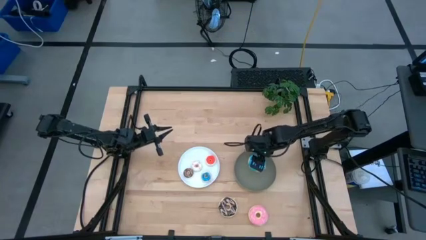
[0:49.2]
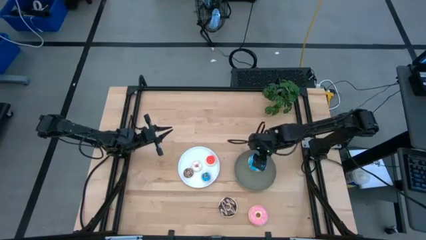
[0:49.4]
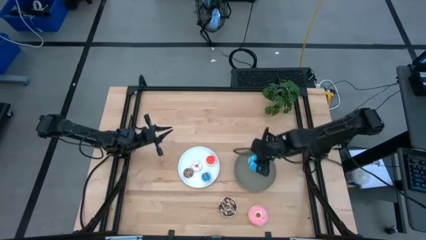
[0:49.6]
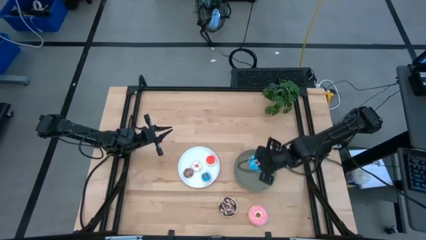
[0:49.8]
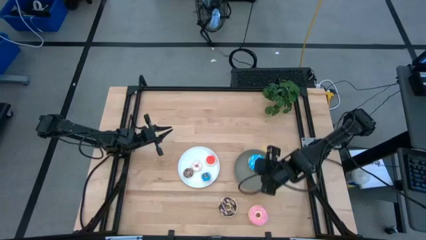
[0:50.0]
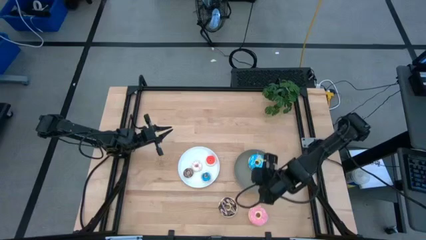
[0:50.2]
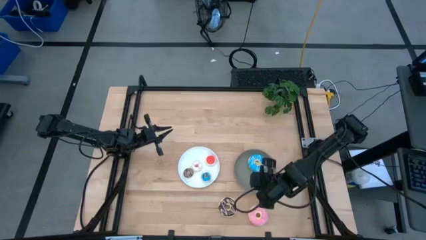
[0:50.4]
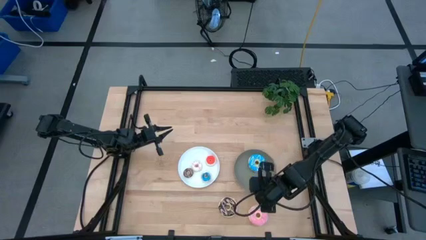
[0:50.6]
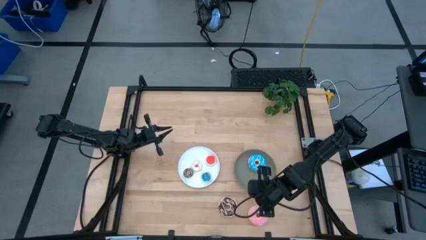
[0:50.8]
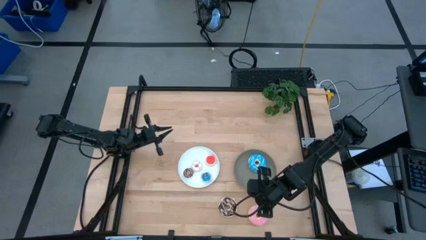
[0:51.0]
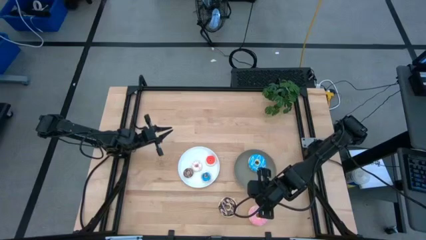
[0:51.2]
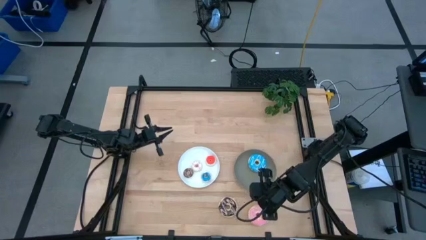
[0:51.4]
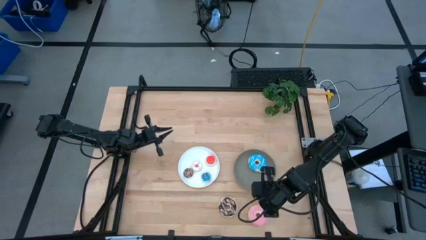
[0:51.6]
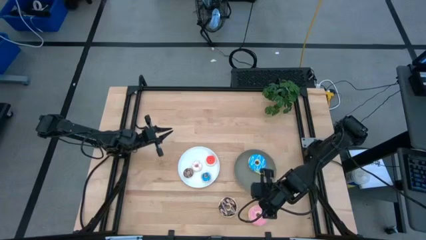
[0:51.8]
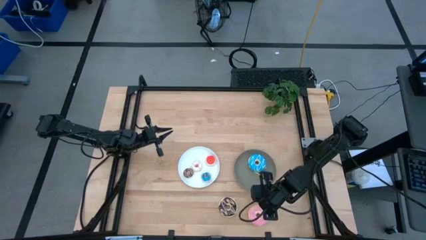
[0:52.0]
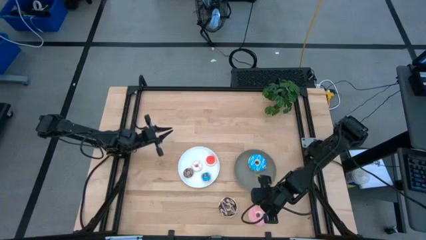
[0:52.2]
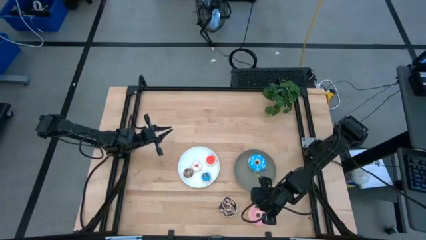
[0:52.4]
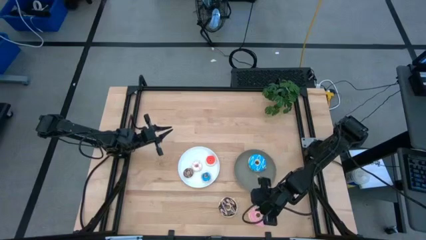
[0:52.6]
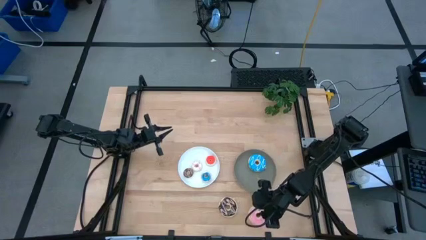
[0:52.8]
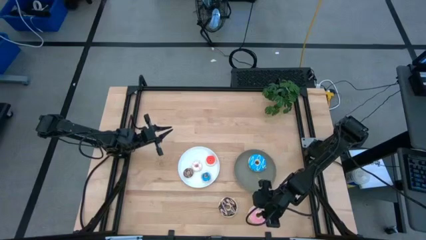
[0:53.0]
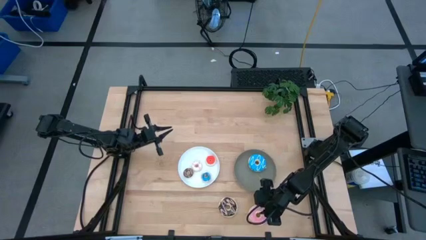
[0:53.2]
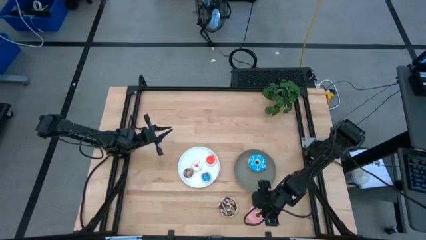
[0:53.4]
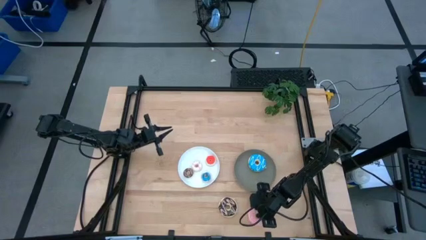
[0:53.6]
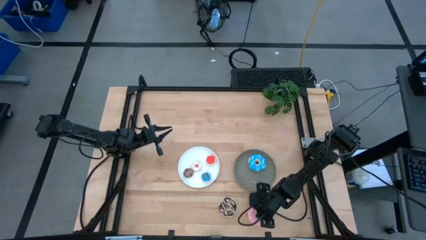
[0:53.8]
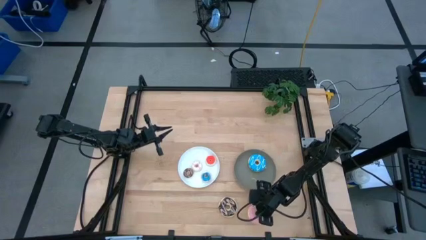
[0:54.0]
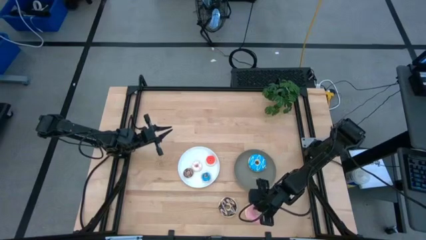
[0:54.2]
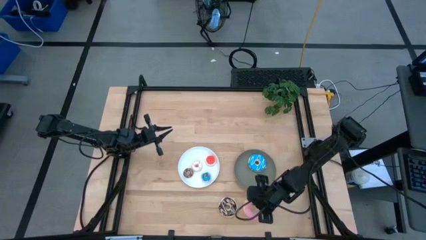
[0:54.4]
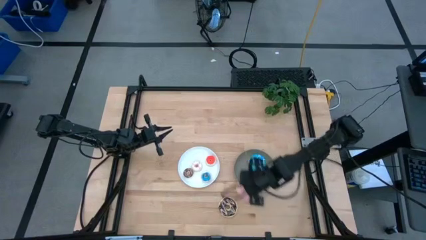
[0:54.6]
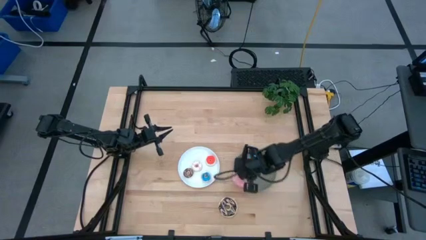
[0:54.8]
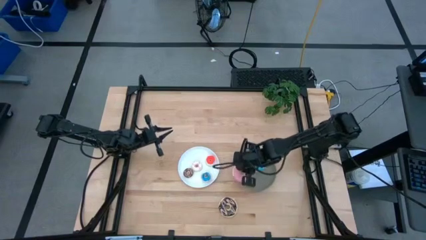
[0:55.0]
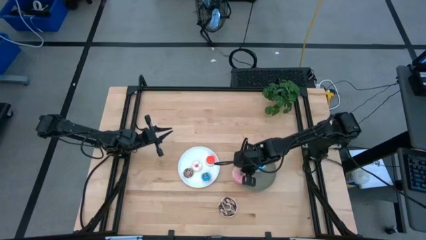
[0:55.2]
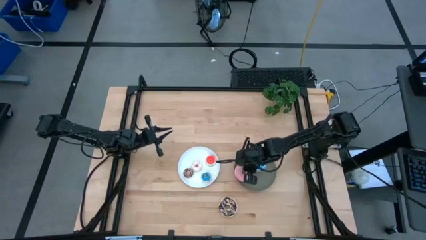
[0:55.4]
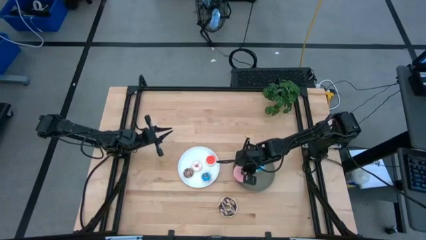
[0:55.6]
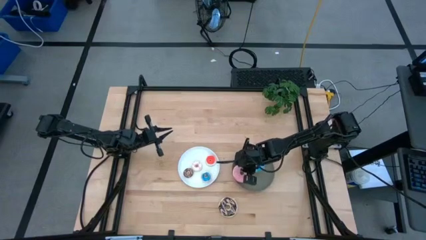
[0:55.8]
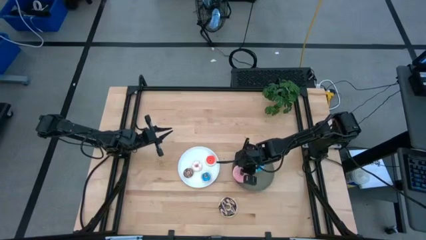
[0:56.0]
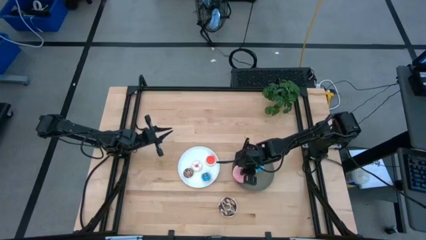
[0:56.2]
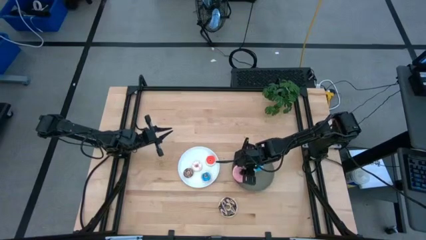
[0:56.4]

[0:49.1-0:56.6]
Task: Pick & Place donuts
Put the large pink donut on the gray plate

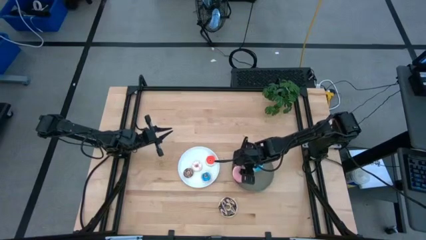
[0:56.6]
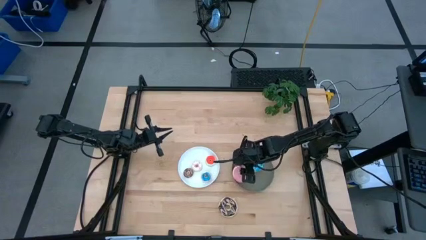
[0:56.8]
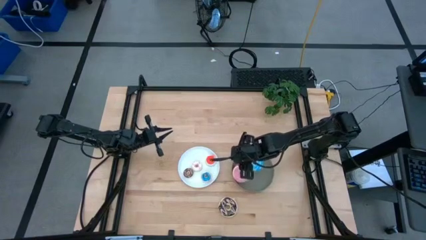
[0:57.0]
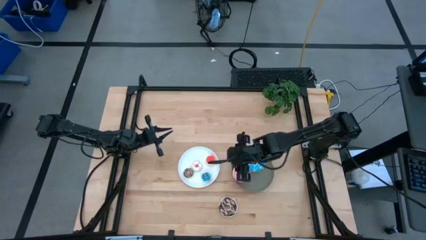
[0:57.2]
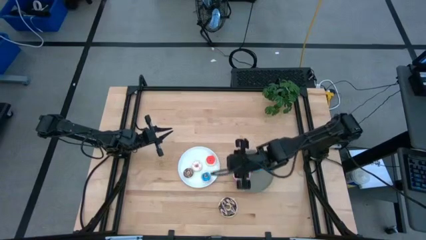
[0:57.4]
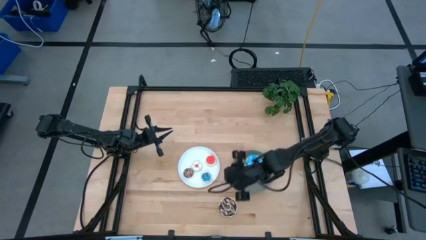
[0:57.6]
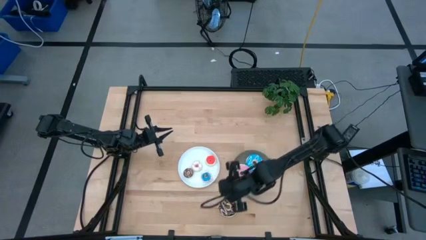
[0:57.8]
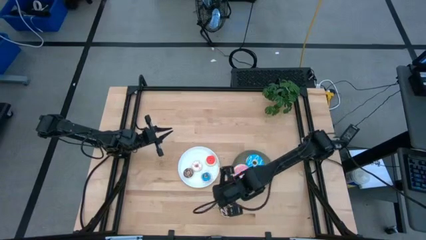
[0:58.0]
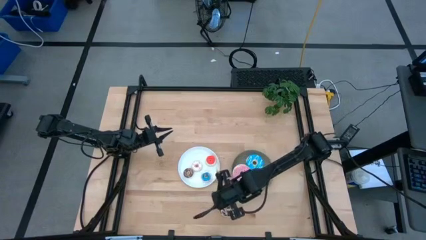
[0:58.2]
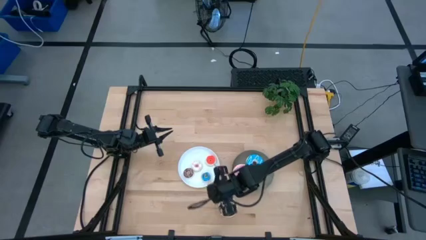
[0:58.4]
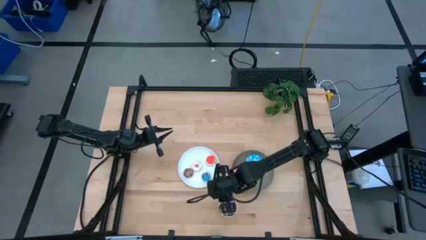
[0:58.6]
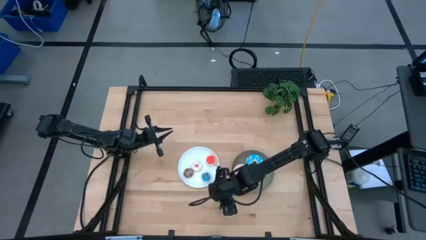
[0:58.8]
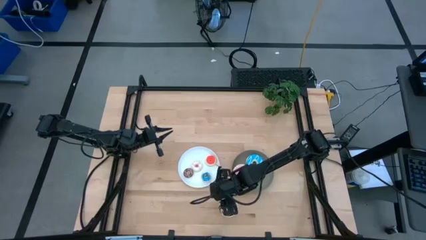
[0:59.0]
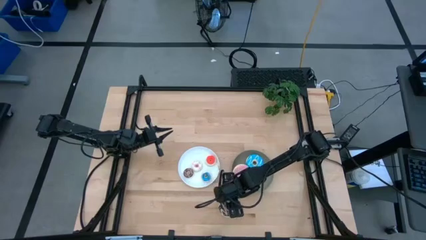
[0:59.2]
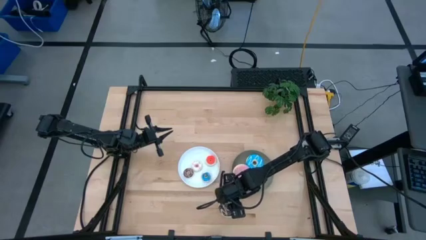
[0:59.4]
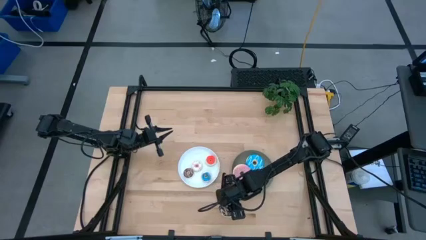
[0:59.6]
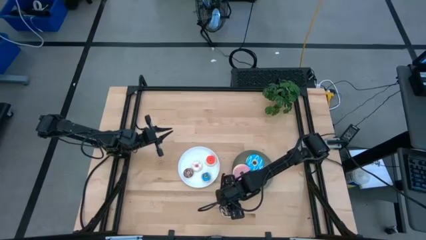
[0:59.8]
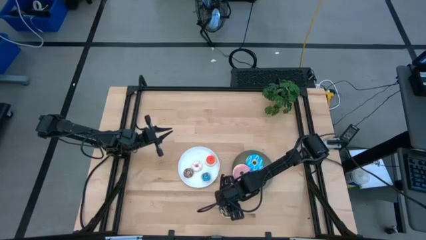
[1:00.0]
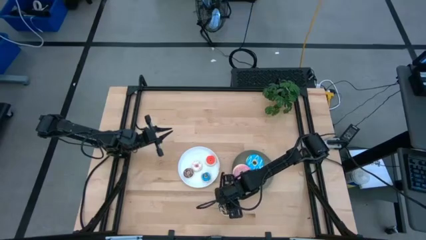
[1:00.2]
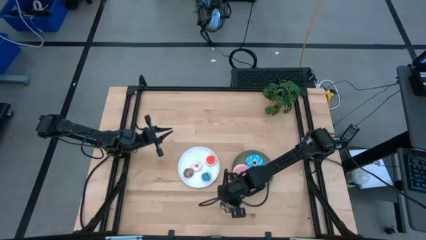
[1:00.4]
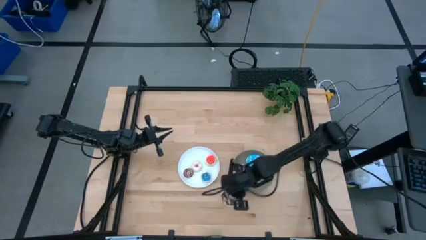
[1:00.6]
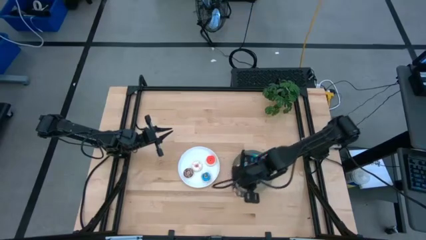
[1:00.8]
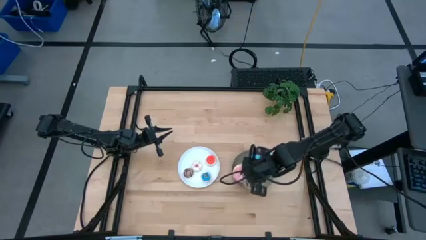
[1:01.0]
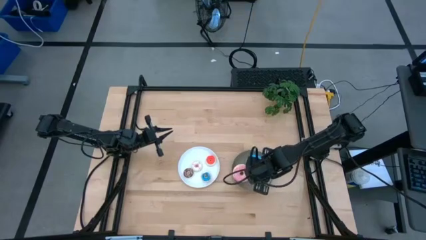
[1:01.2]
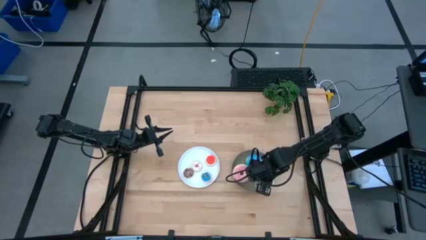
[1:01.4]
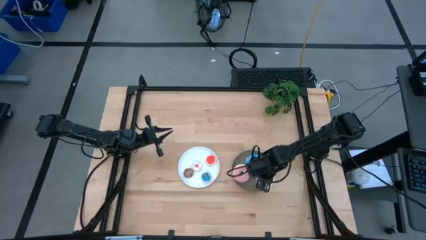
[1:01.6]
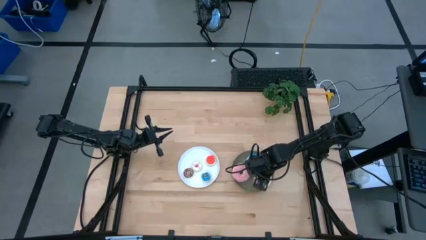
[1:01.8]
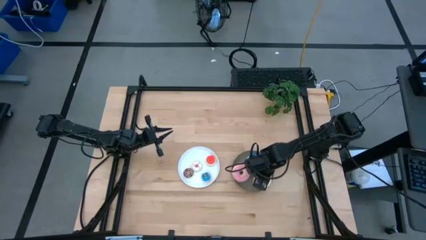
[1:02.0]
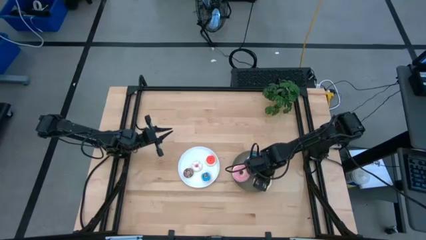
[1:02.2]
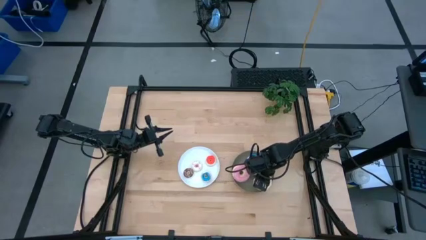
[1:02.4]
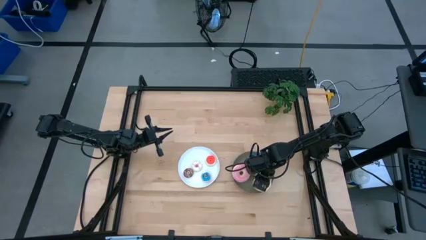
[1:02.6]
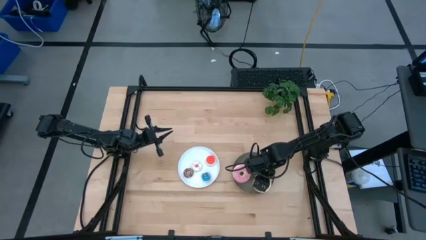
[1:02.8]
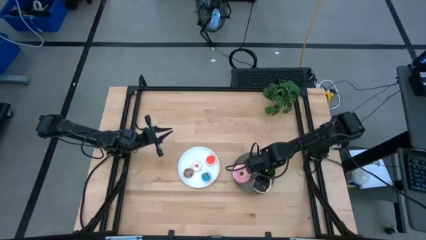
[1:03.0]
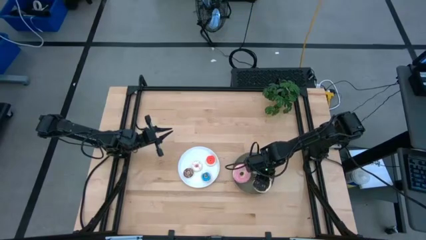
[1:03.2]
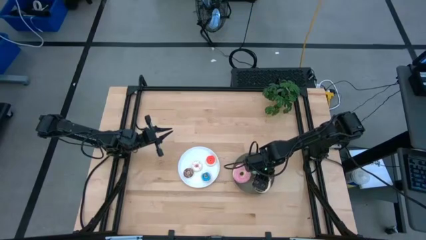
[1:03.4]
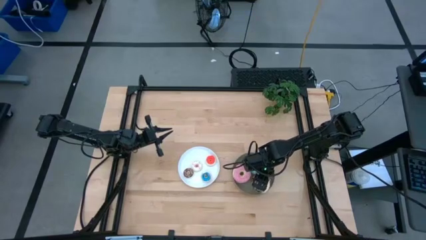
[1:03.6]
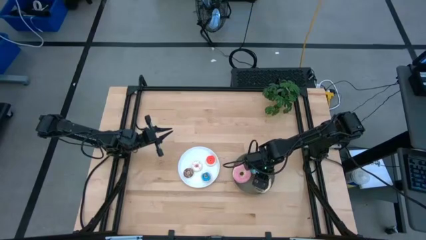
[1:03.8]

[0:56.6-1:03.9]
Put the large black donut on the gray plate
